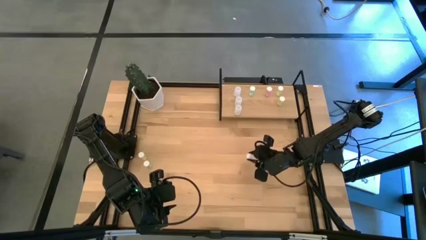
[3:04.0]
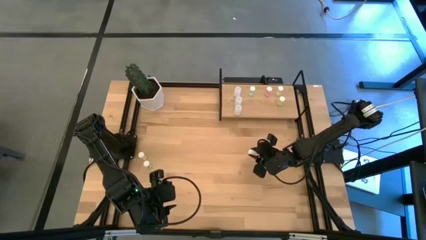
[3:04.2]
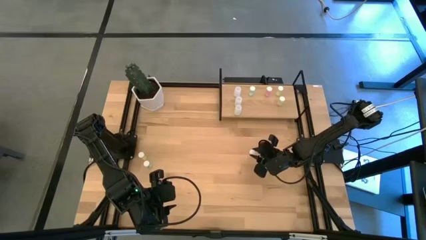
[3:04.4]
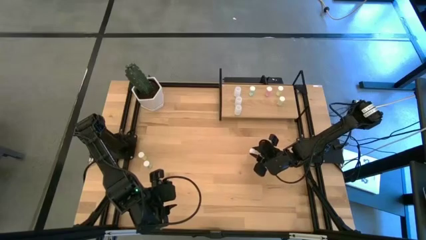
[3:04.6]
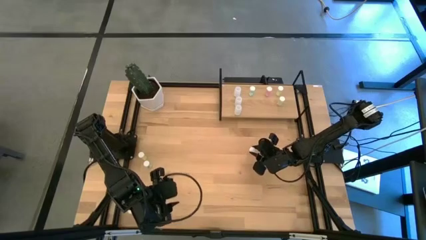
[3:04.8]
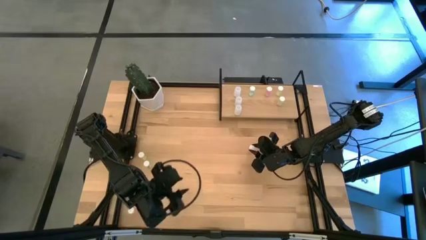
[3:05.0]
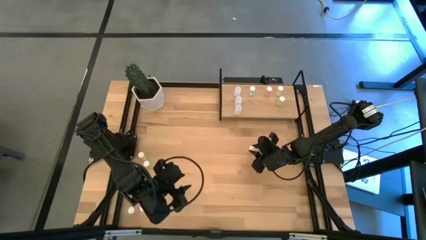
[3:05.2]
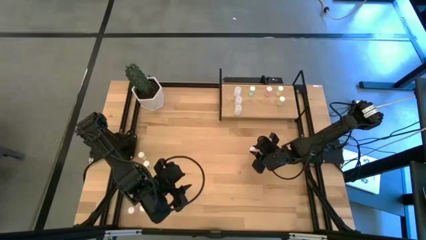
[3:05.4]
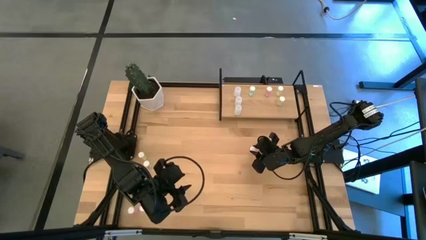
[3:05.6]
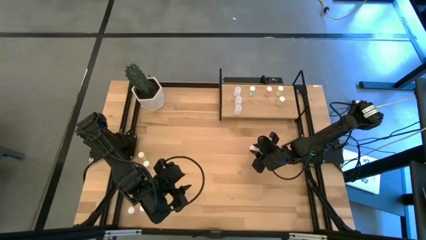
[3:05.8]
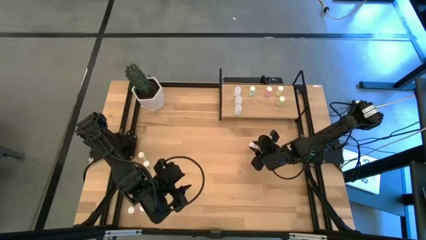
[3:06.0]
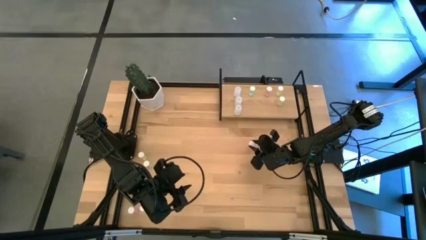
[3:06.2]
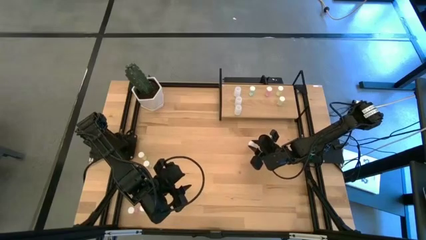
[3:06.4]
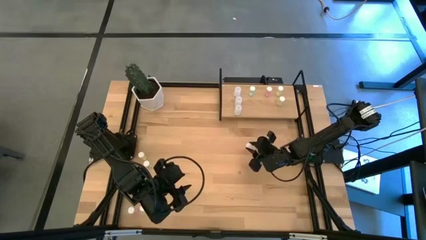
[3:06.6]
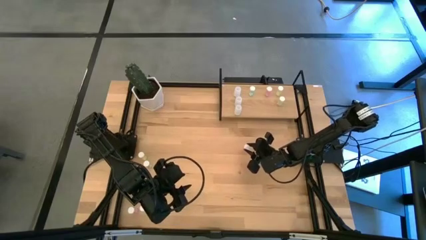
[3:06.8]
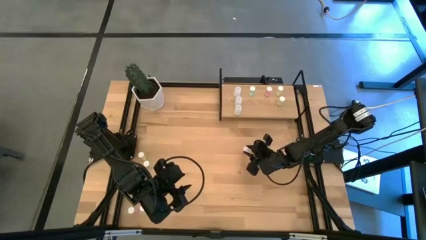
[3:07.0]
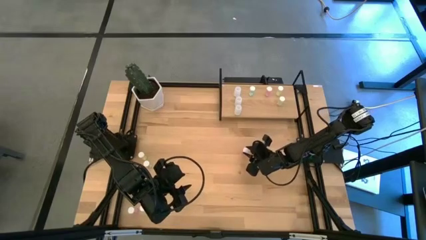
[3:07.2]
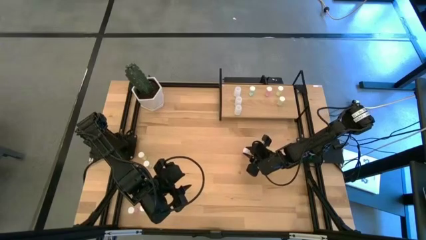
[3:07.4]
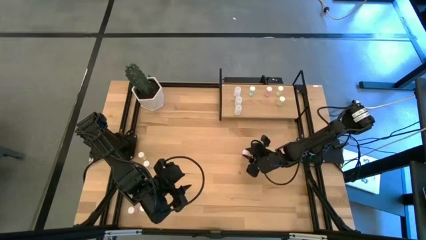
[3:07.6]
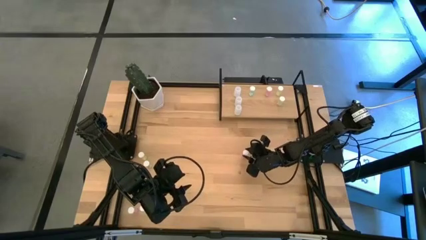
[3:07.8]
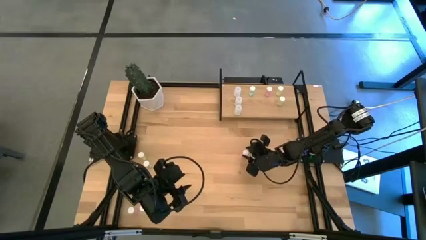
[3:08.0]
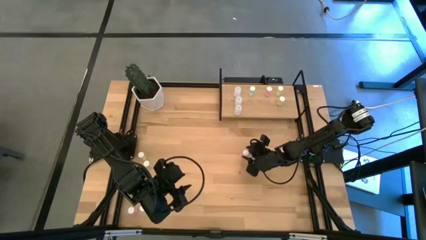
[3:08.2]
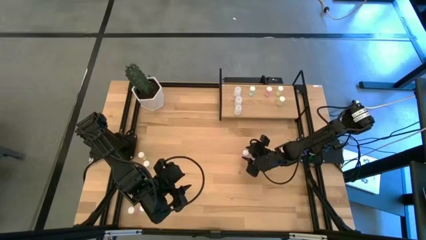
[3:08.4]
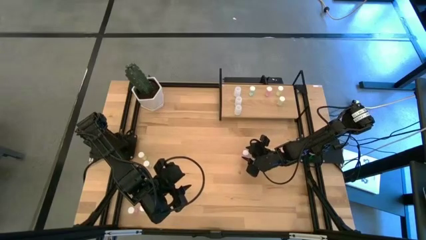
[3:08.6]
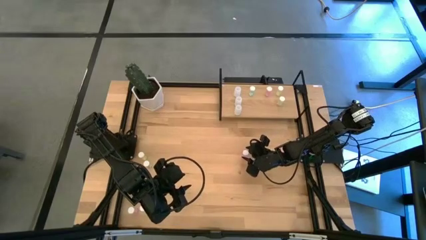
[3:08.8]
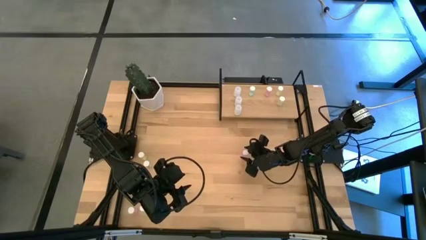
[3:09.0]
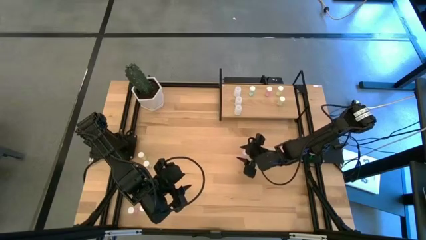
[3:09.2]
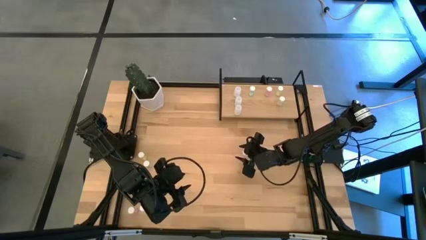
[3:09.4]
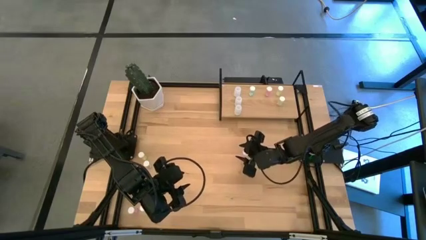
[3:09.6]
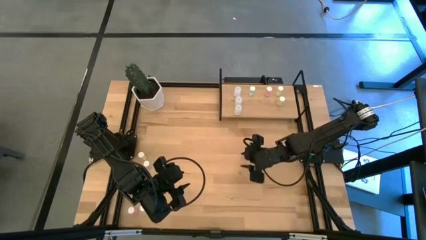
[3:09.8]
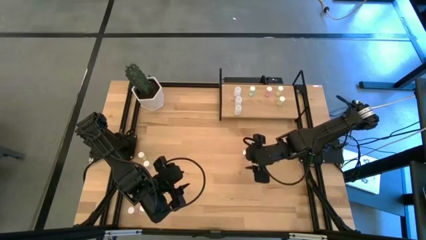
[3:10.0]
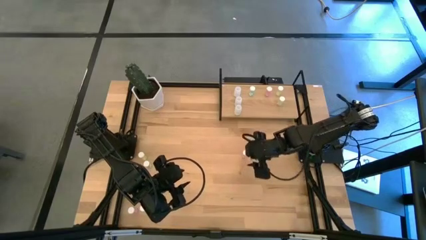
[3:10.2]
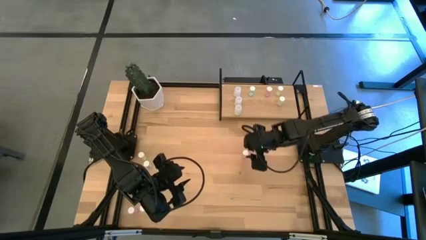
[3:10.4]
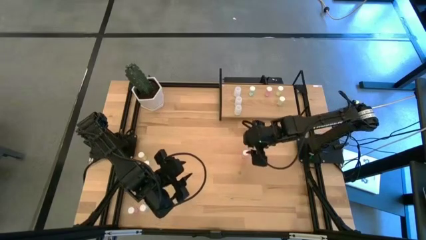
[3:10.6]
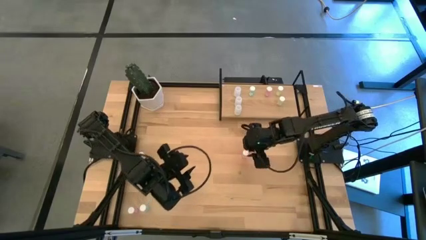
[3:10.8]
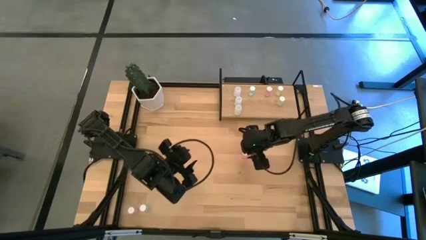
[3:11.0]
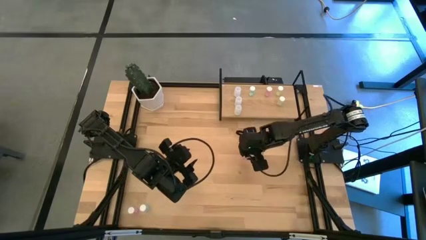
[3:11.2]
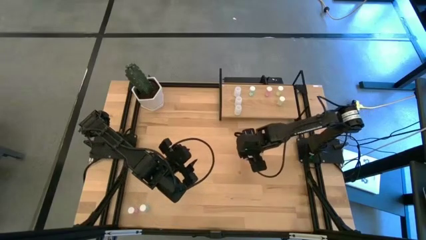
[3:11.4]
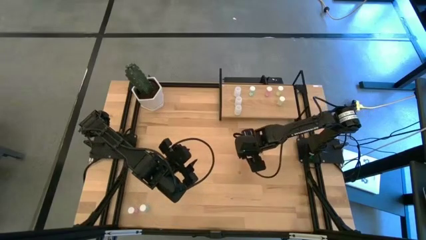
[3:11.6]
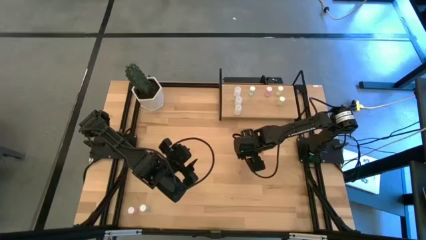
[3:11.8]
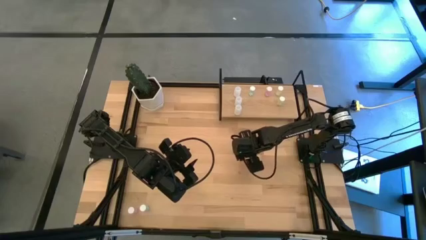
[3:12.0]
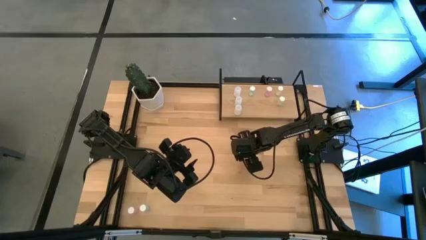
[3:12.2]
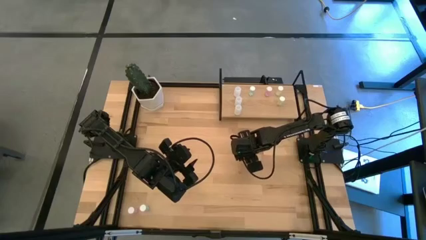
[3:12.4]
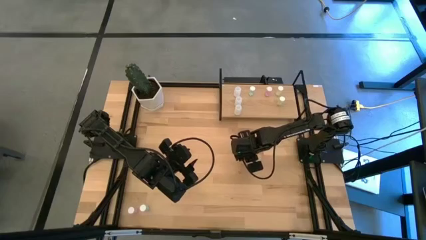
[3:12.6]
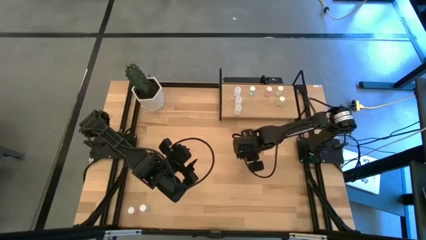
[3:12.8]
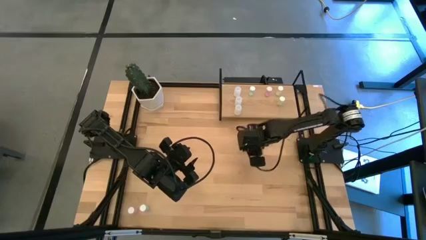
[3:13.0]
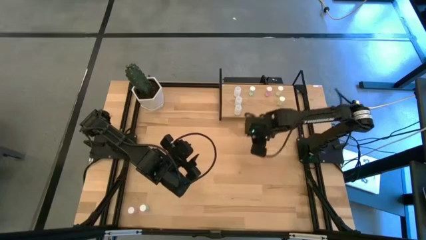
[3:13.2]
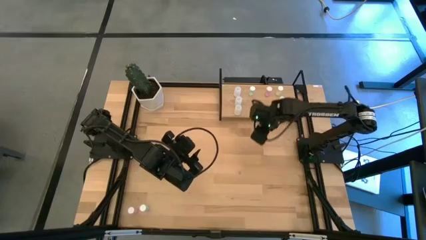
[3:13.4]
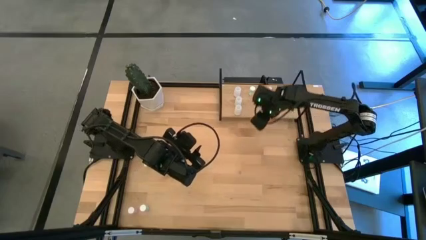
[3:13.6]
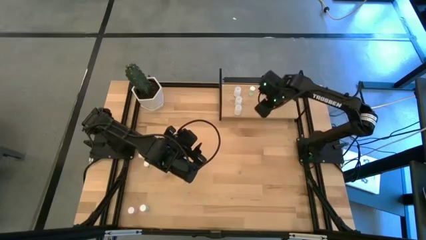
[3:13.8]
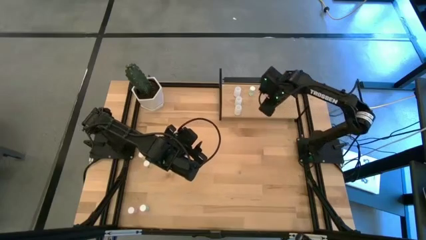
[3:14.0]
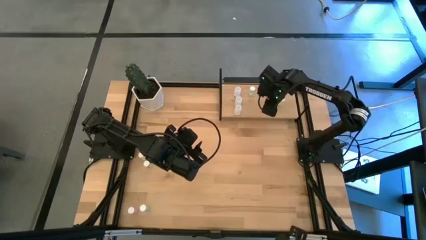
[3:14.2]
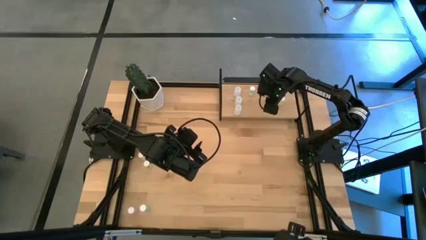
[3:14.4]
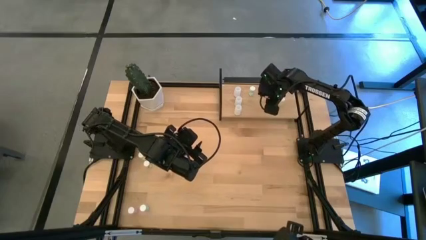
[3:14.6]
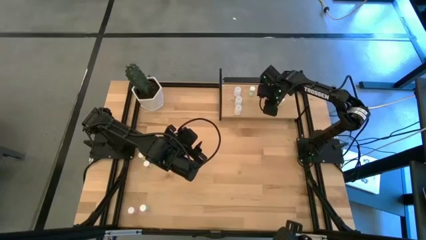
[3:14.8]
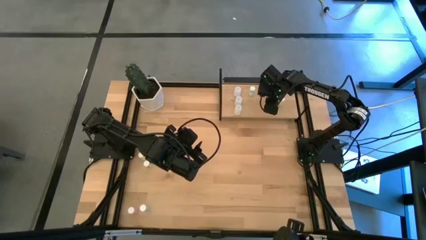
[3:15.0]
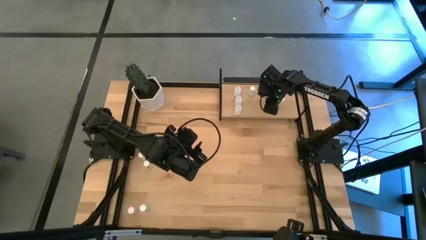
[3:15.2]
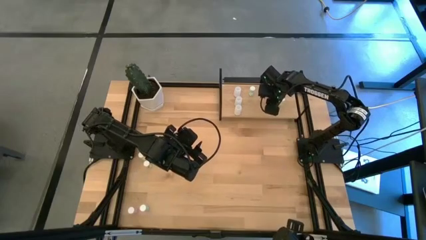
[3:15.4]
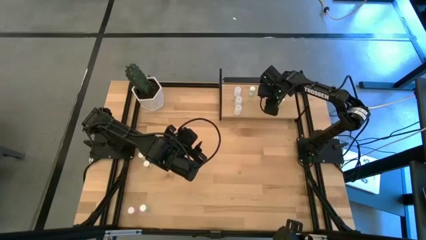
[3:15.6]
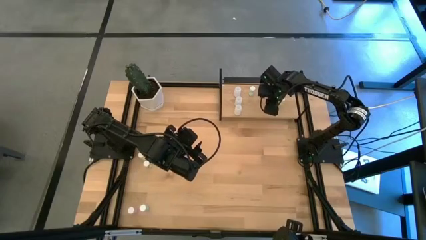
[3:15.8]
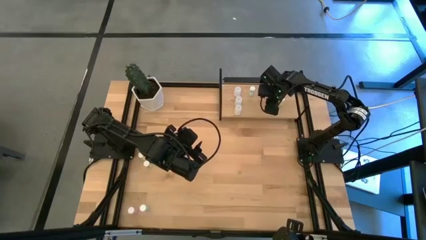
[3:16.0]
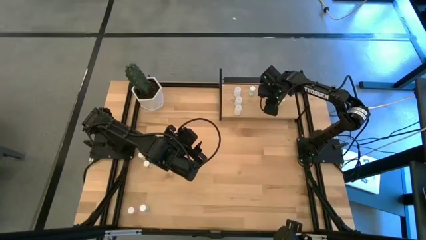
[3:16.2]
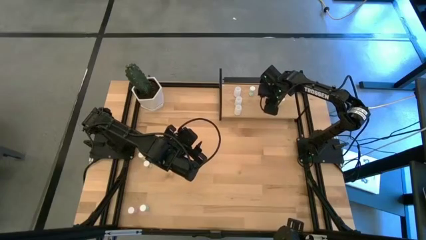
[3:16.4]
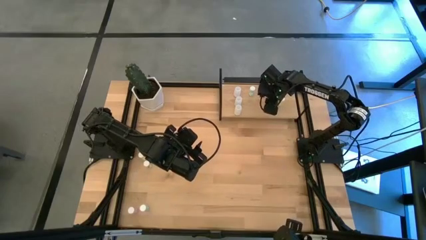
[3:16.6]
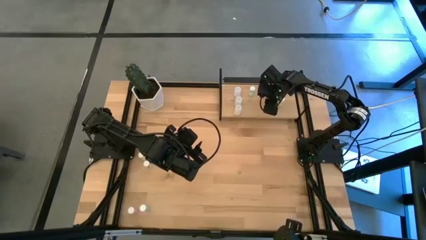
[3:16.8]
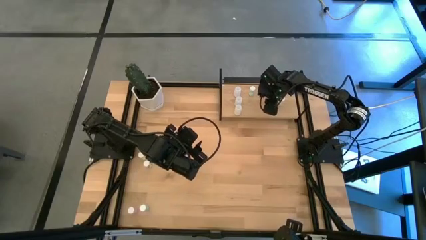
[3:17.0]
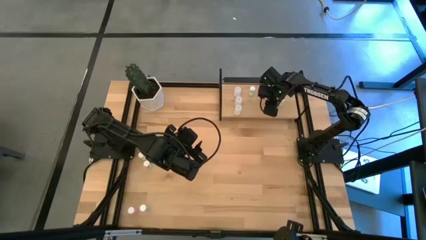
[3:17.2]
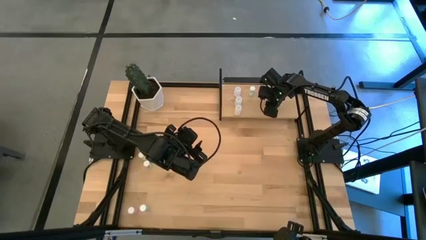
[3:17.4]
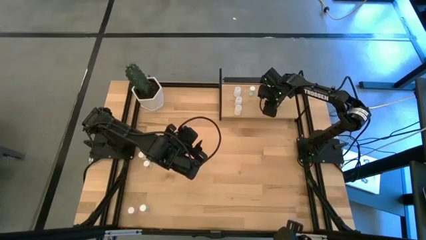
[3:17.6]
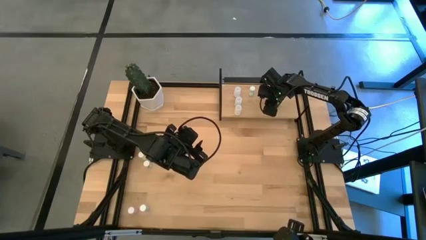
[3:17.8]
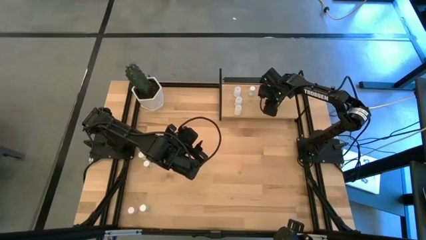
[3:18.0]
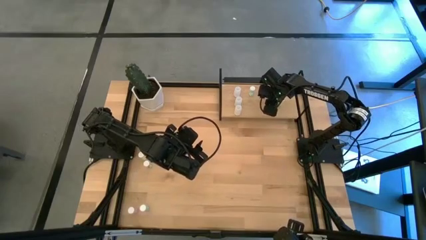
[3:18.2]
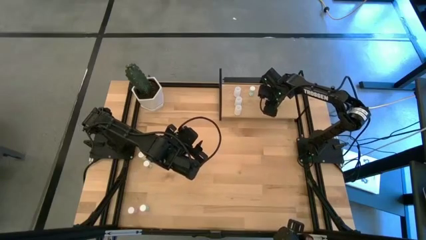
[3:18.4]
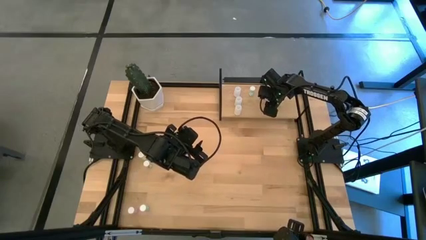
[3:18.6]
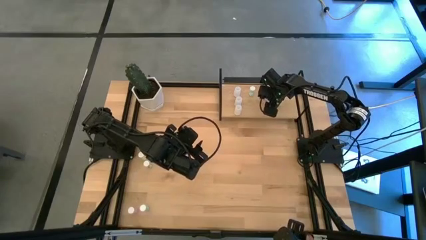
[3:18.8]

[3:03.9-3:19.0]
Task: Pick and place medicine bottles onto shelf by color
Put the right pink pill bottle on the shelf aligned with the other pink pill bottle

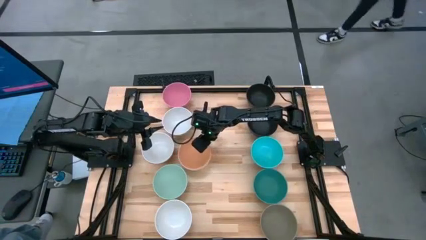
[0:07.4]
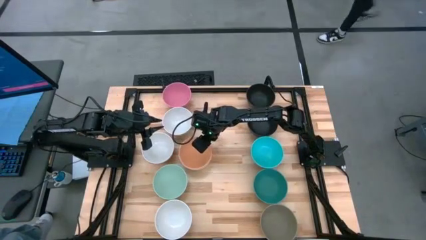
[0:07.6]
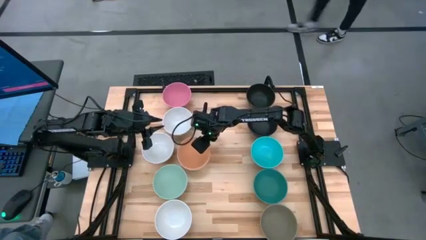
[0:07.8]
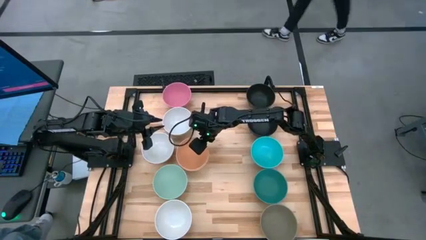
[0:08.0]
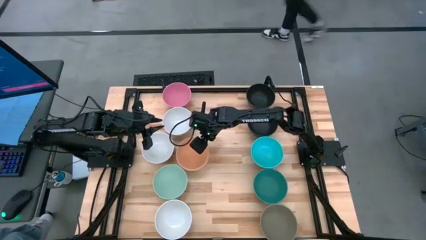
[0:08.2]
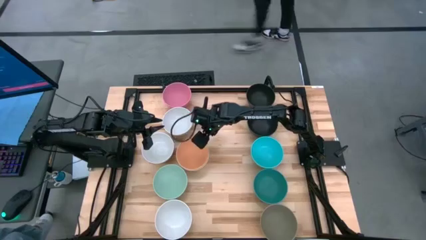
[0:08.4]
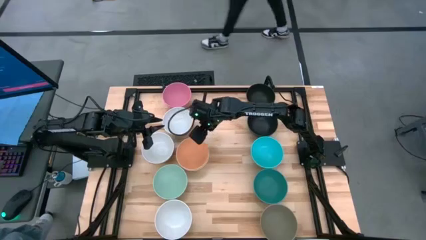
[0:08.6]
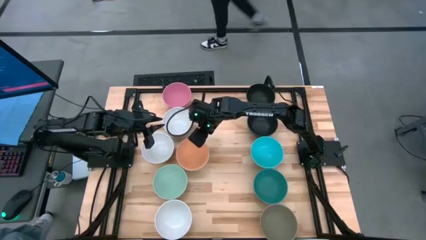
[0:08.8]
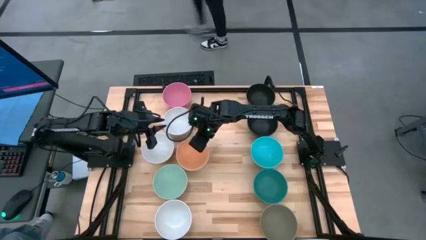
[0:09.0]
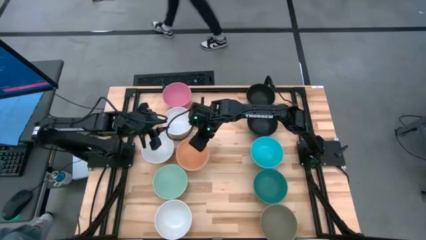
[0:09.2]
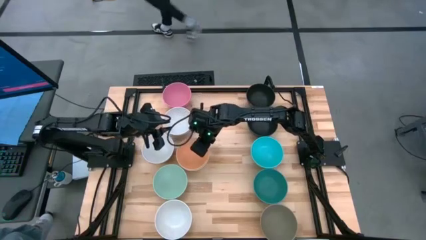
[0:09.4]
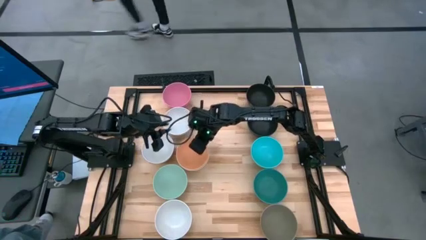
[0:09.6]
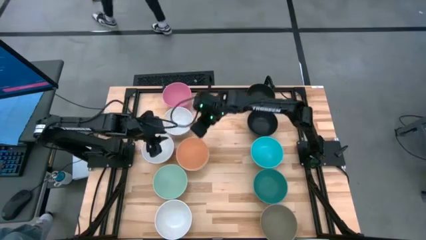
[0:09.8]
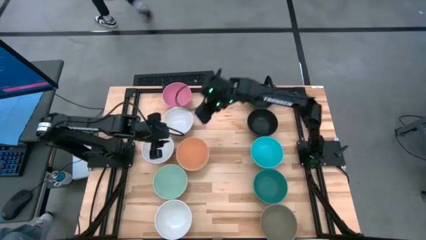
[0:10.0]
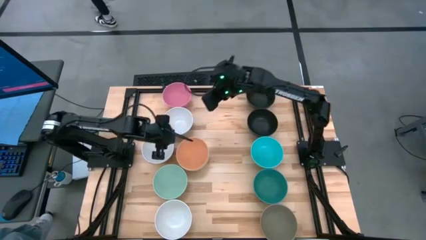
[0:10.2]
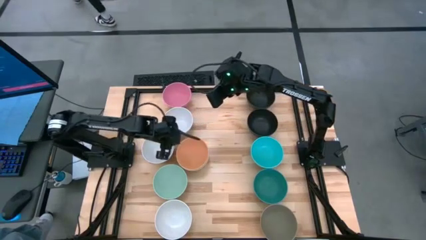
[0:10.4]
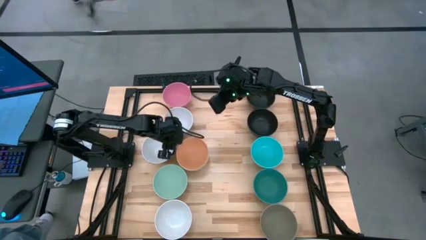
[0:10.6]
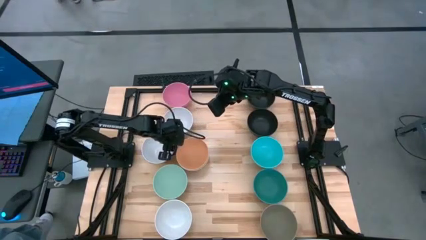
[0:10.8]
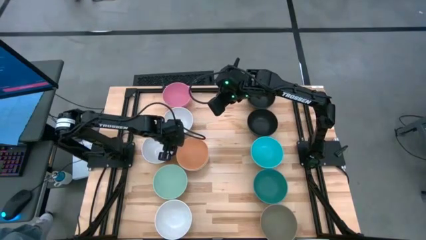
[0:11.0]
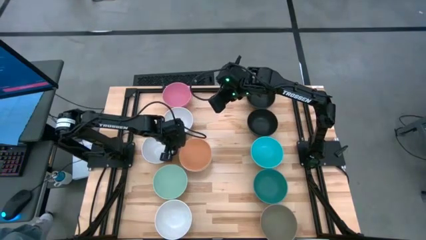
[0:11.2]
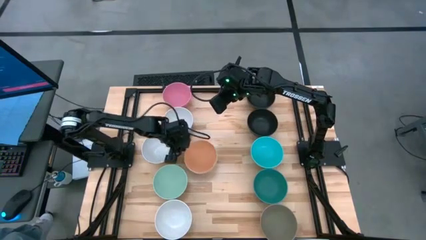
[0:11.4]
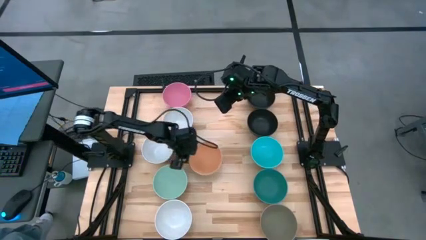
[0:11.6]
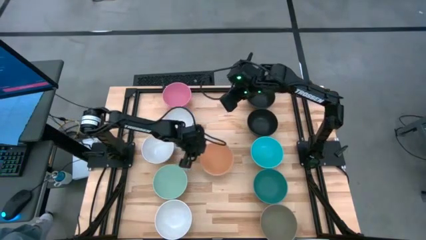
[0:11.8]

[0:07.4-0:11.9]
Task: Nest bowls inside each other
Move the stack of bowls to the center of the table
